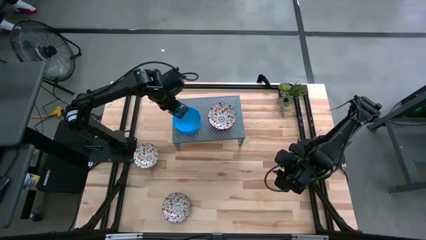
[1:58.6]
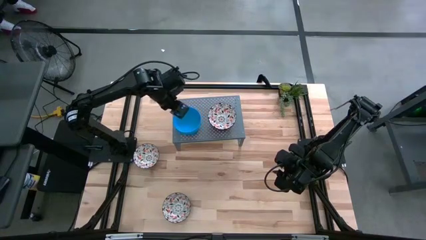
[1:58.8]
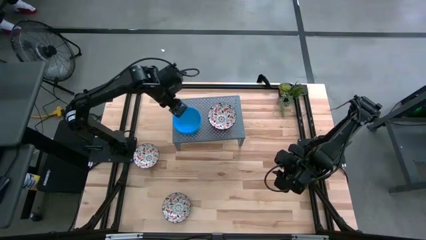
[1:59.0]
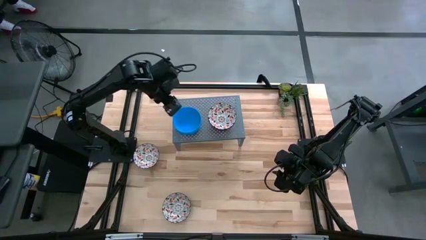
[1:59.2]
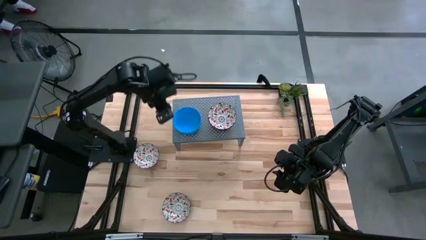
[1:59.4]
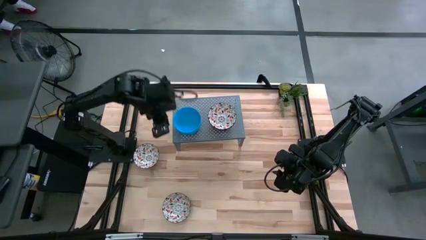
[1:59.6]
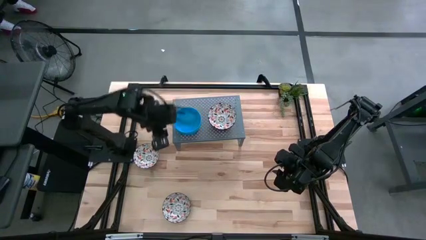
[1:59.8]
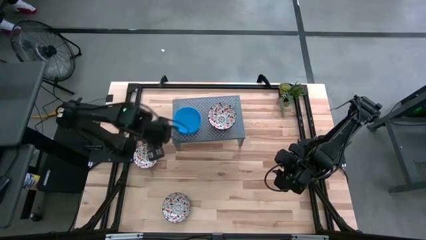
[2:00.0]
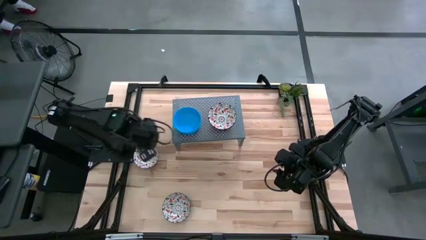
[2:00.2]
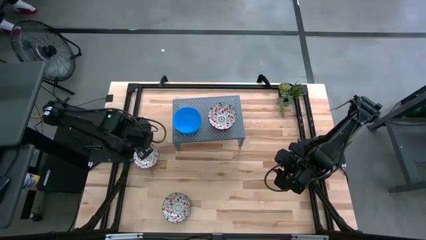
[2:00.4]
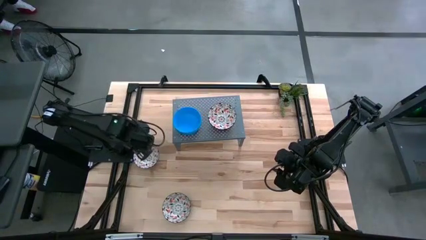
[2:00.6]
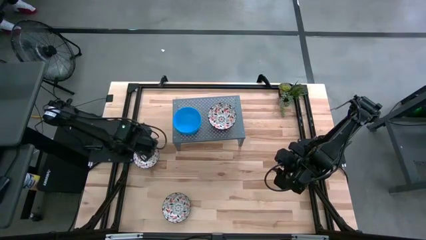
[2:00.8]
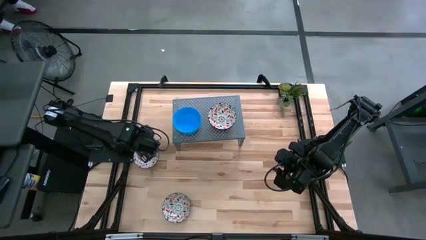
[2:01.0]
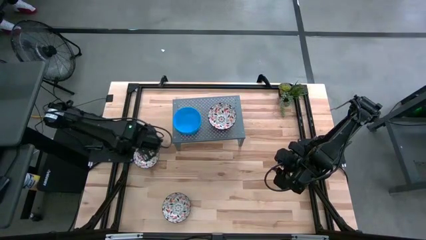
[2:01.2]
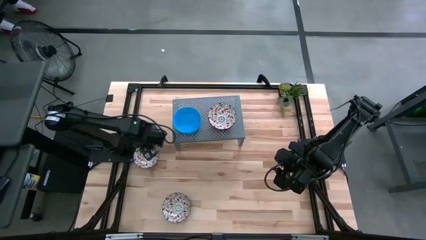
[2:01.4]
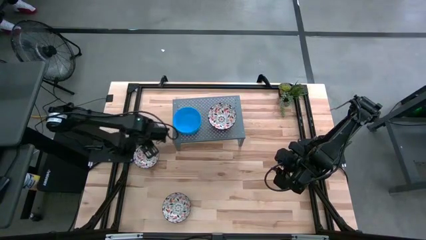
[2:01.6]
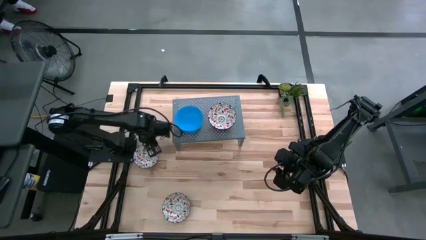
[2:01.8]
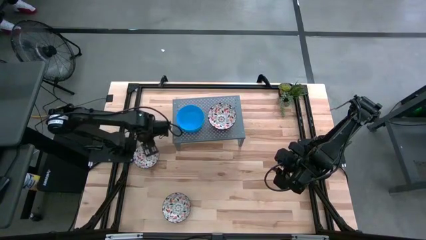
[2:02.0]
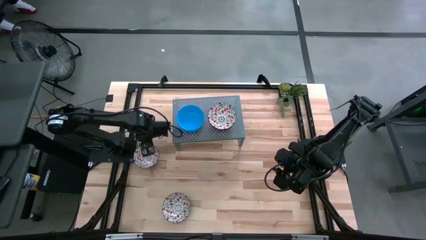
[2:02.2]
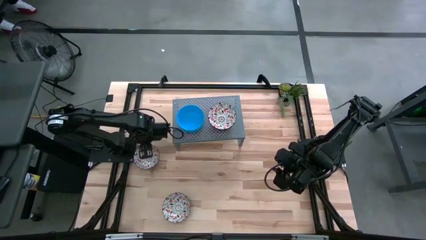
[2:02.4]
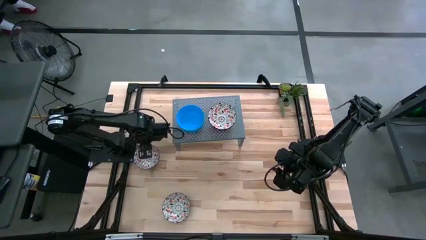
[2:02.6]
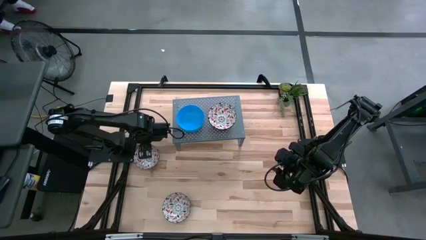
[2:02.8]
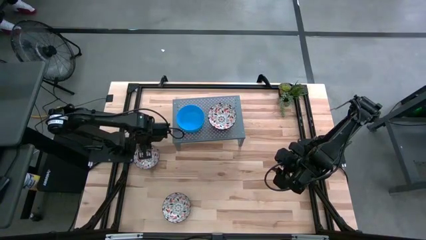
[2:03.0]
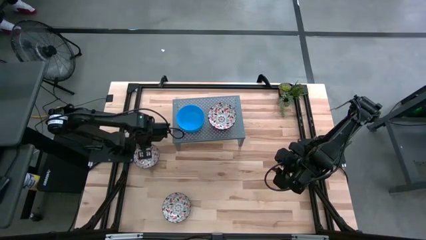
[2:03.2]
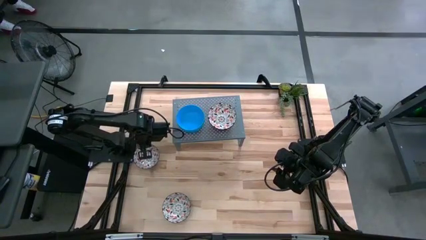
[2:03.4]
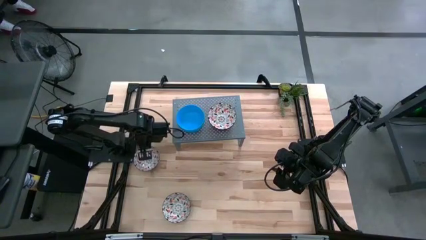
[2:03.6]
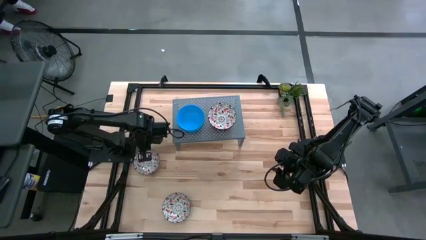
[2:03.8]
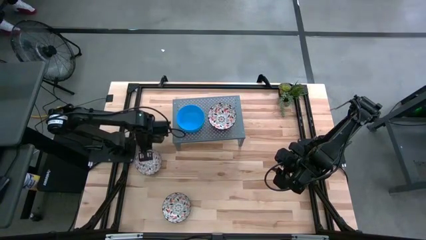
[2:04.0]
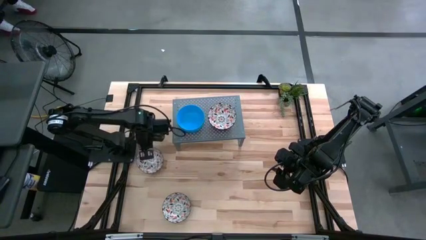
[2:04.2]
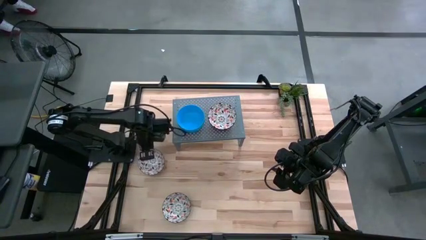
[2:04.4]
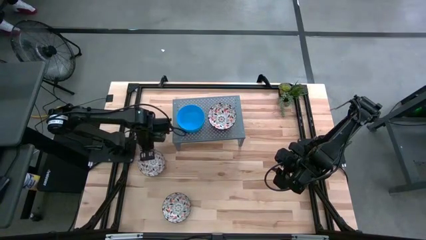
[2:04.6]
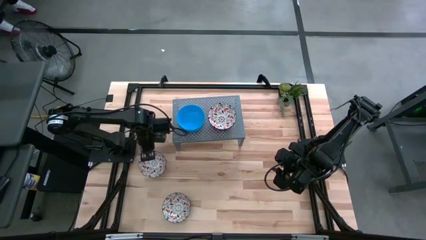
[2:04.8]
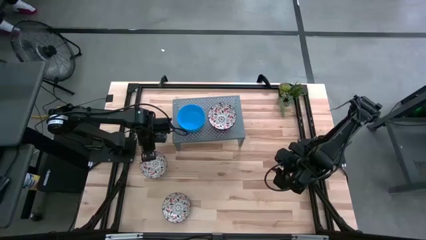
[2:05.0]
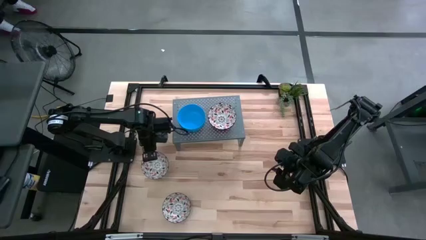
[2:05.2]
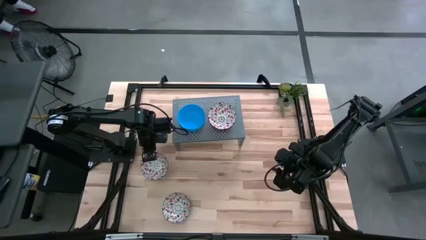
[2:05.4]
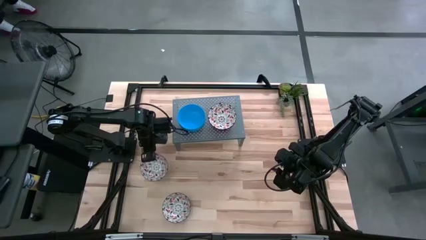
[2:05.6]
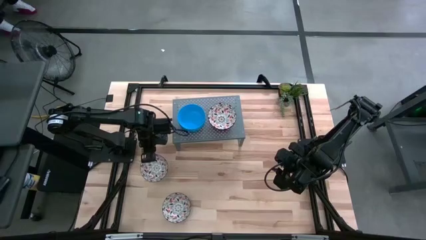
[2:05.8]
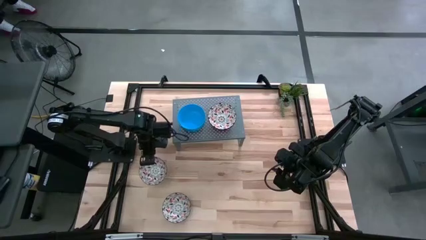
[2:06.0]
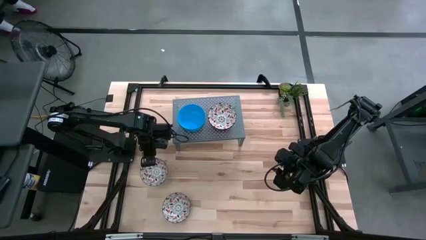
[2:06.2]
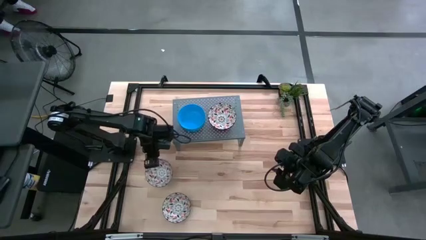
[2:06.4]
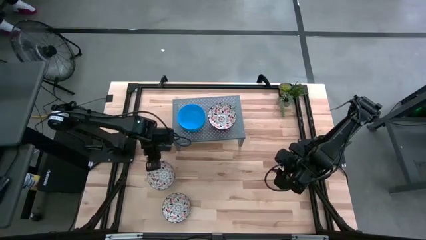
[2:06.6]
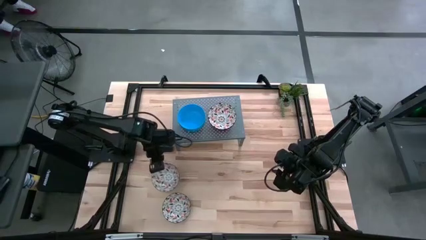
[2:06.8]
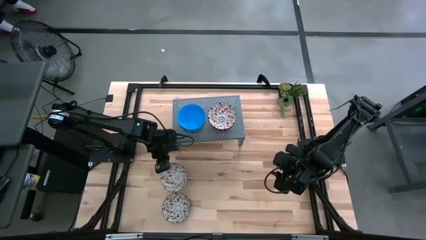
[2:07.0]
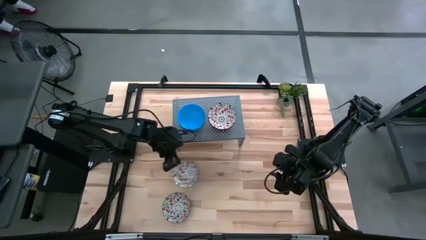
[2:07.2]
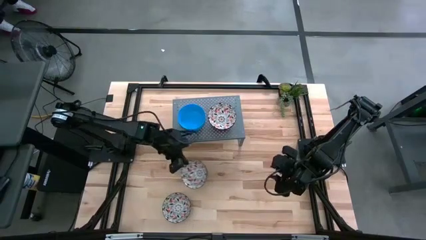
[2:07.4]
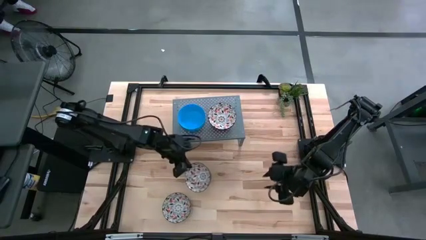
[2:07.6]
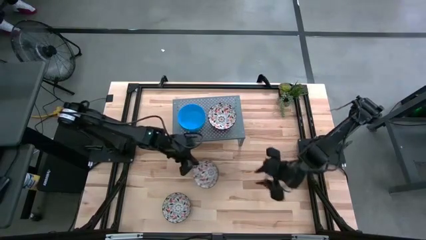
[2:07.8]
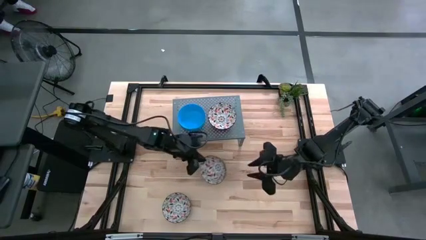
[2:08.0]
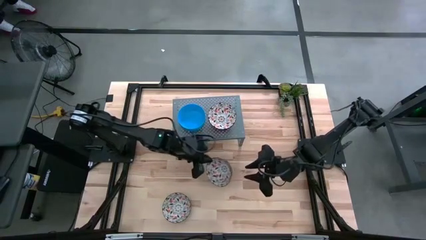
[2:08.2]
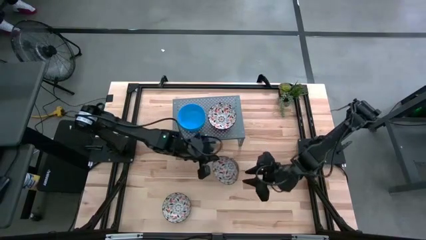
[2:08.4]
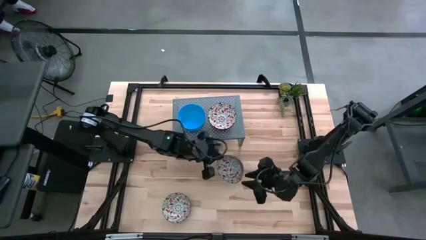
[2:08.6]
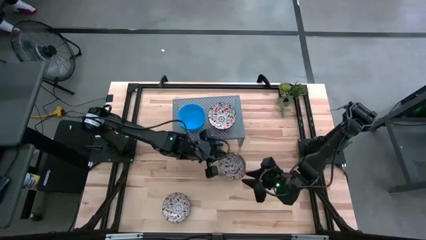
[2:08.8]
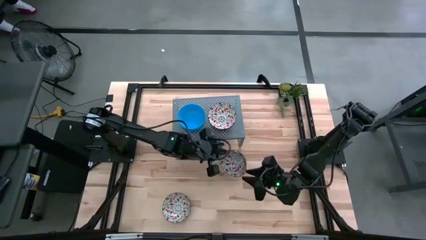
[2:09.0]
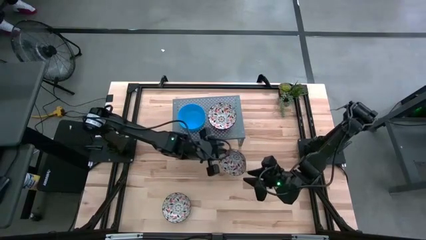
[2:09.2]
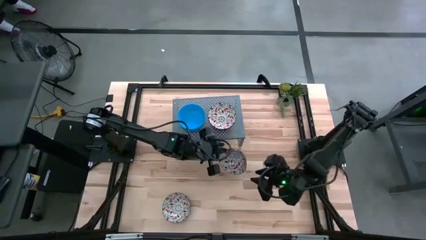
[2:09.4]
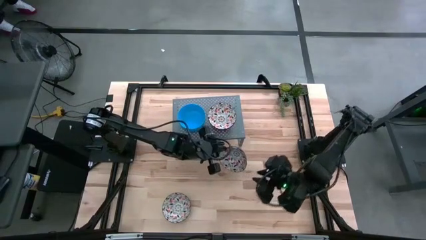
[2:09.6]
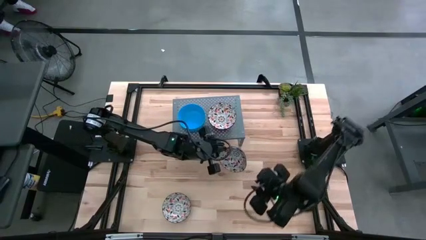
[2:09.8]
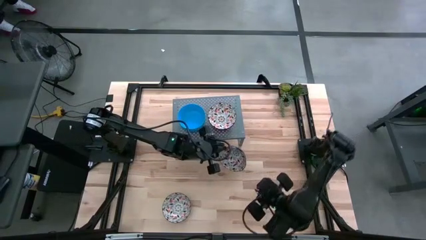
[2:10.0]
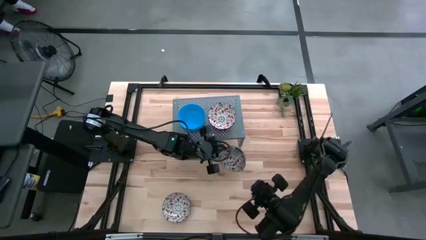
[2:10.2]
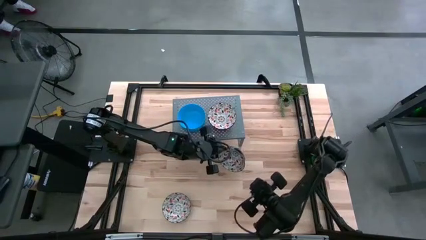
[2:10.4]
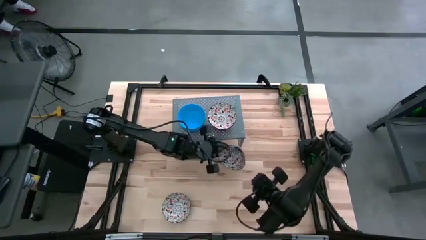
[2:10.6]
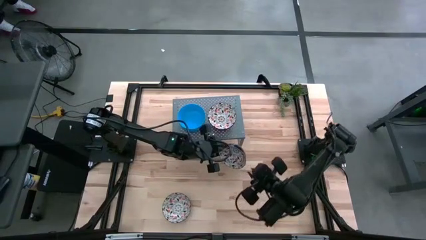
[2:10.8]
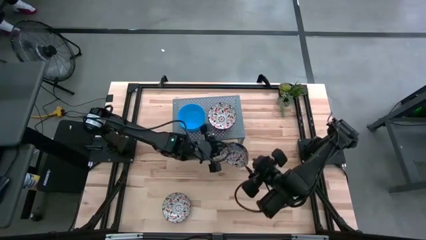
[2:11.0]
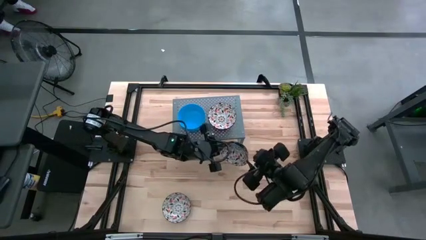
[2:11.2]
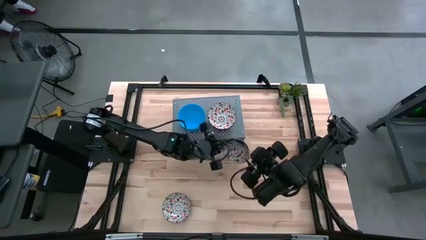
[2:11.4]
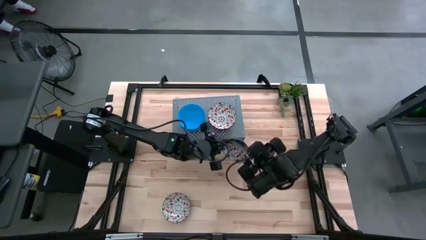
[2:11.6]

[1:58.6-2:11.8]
Task: Pick & Place Mini bowls
Stack the white bowl on top of the white bowls on the shelf

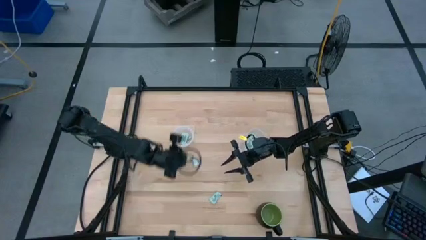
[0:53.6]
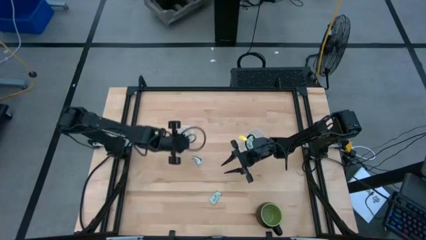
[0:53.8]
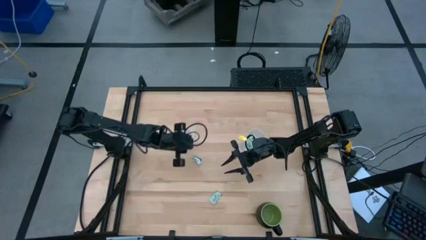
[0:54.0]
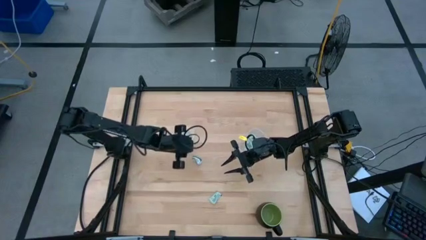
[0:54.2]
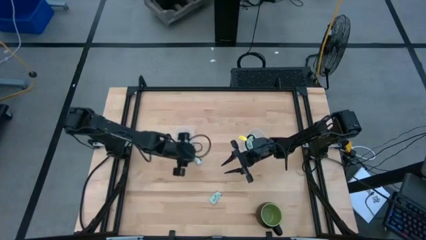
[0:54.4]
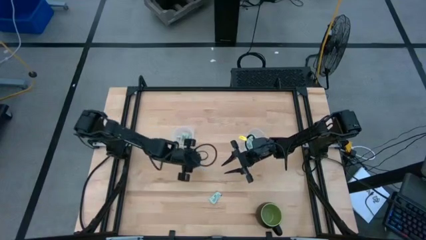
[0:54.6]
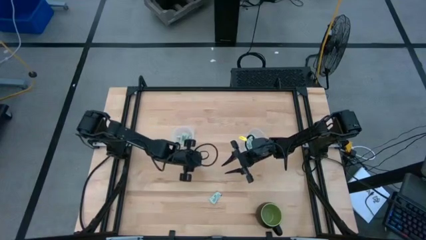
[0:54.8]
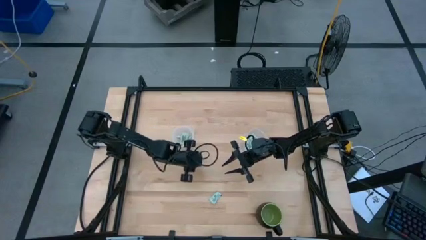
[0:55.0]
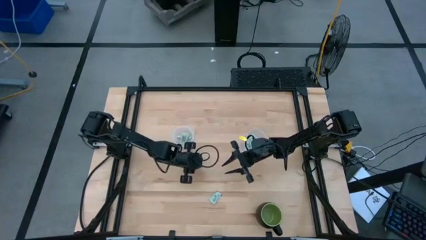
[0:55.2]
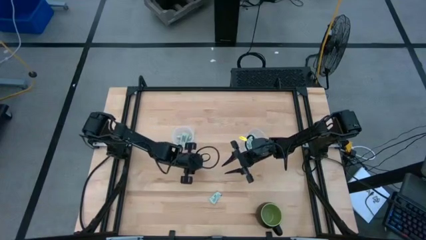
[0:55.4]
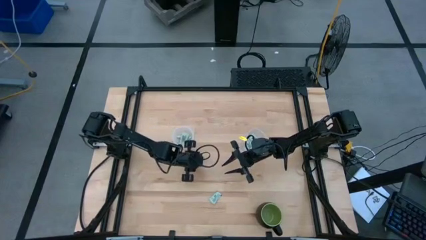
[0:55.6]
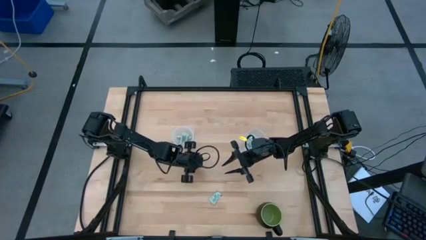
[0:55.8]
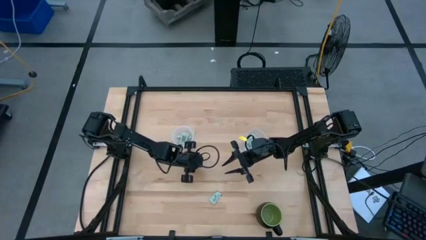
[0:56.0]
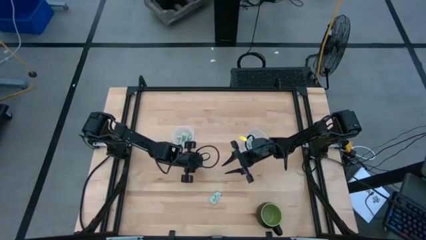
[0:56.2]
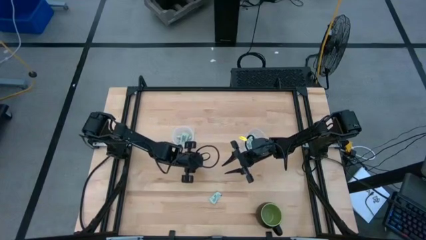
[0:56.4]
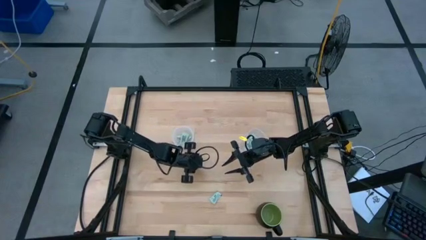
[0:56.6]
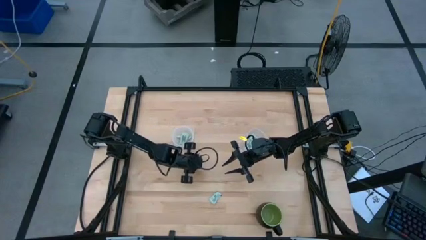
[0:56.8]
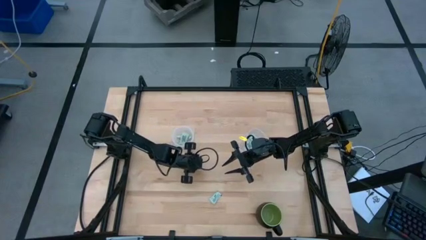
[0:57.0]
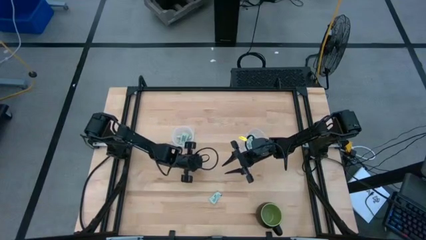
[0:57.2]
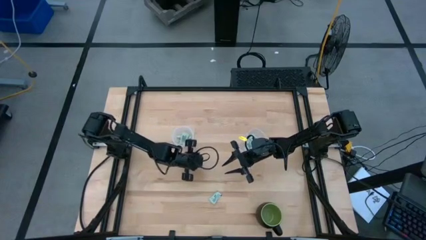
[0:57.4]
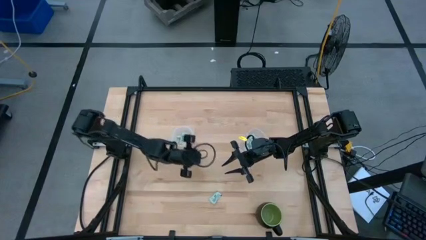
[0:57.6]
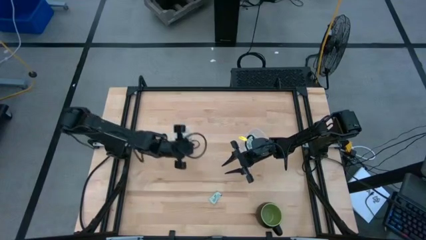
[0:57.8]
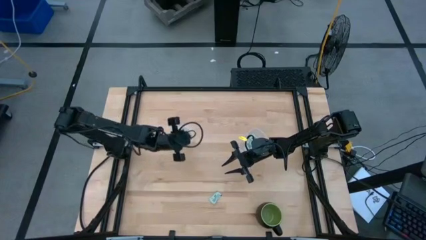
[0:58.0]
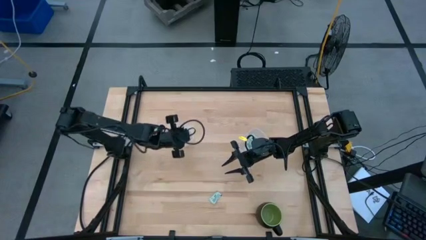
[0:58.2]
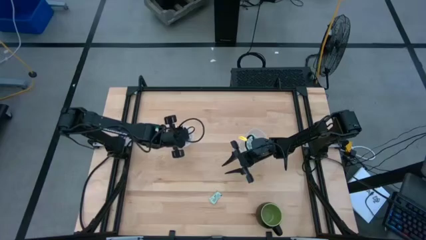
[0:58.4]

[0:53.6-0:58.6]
Task: Pick and place Stevia / Truvia into bins
Put the green stevia packet into the left transparent container
